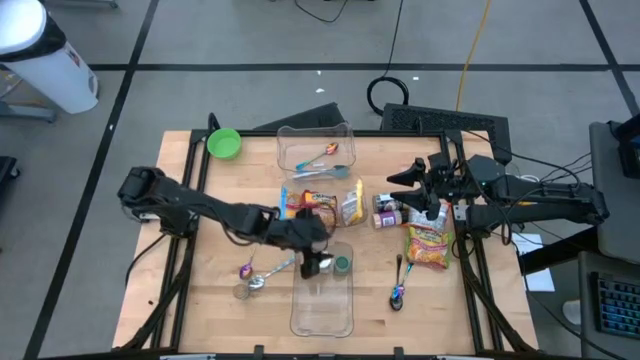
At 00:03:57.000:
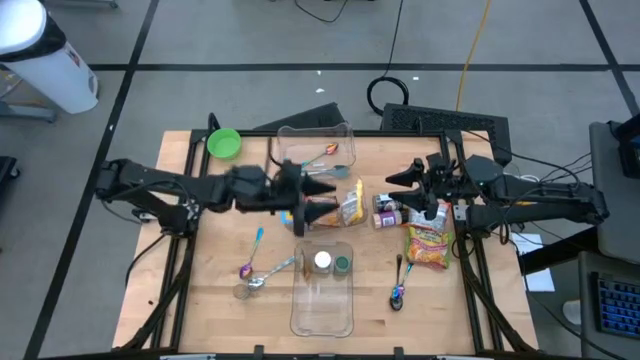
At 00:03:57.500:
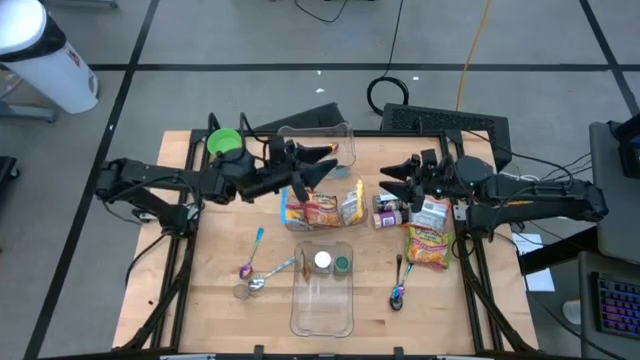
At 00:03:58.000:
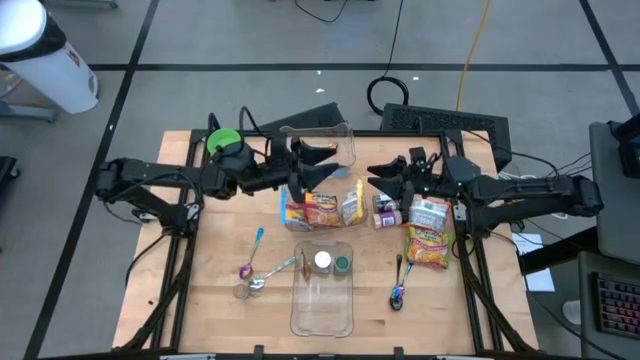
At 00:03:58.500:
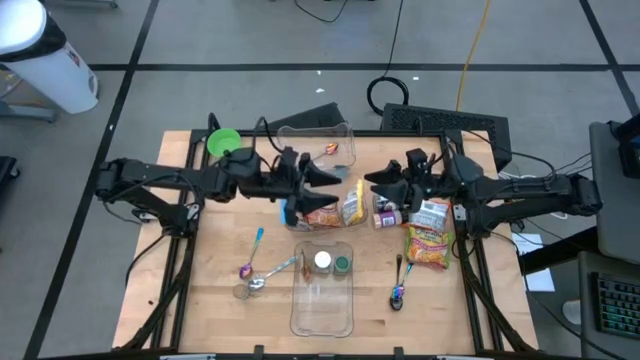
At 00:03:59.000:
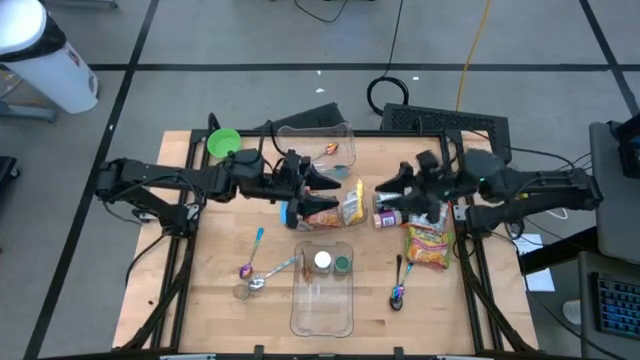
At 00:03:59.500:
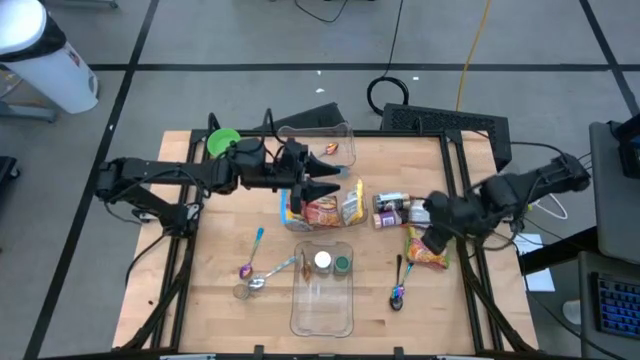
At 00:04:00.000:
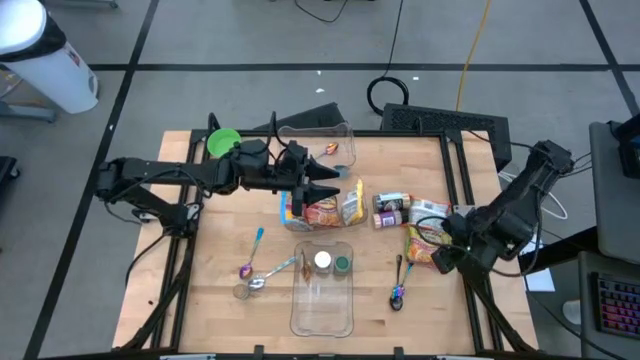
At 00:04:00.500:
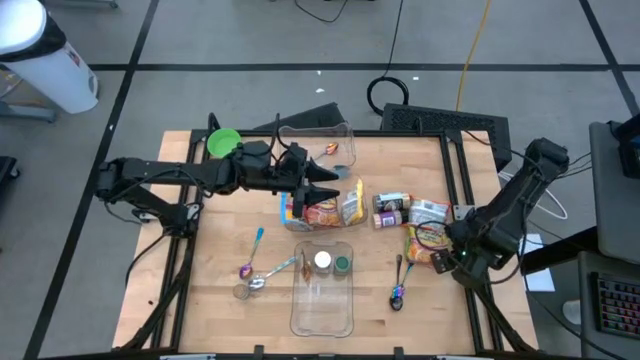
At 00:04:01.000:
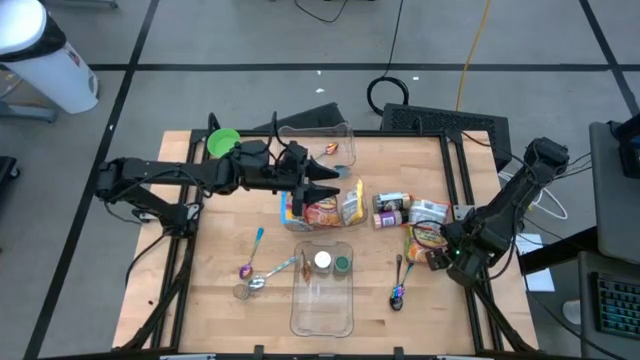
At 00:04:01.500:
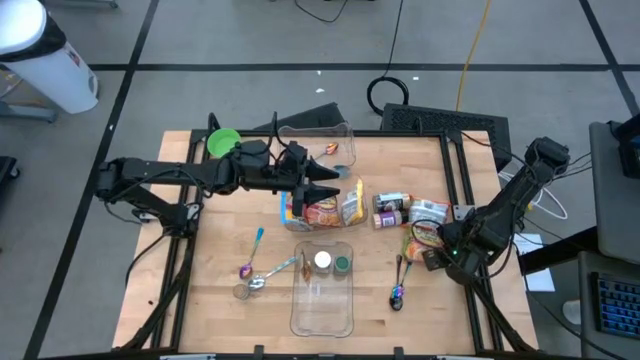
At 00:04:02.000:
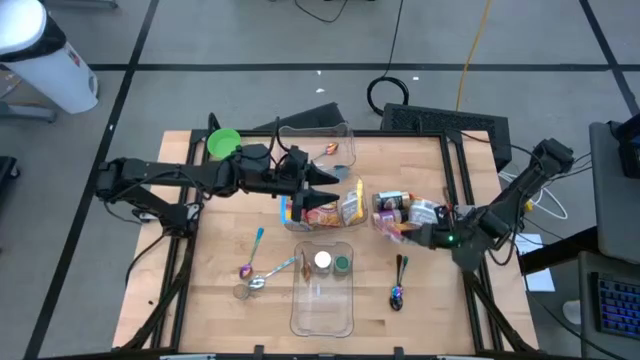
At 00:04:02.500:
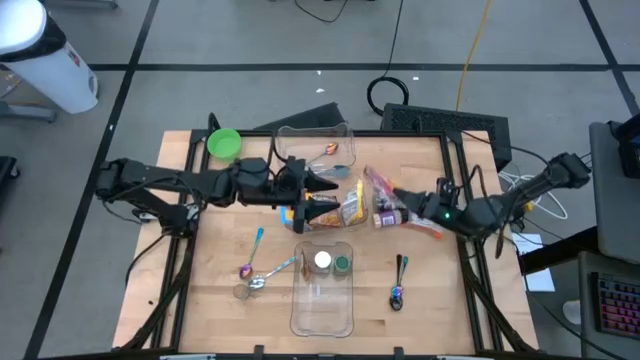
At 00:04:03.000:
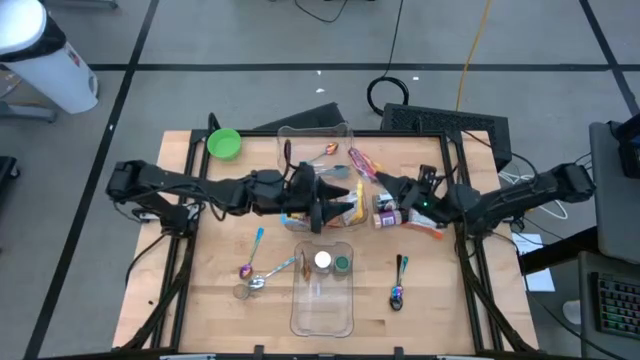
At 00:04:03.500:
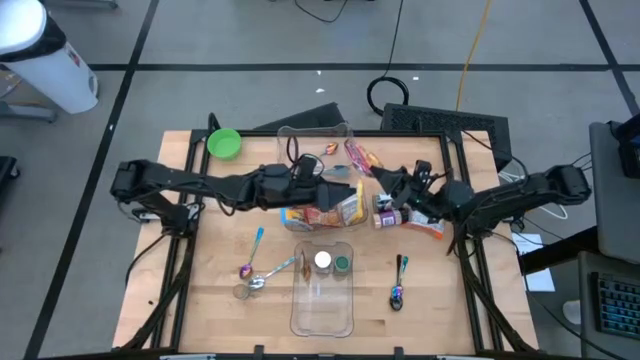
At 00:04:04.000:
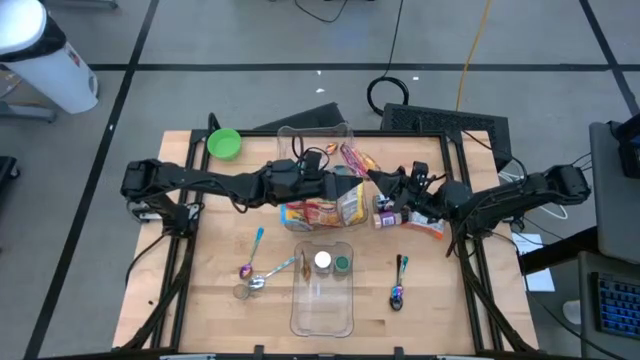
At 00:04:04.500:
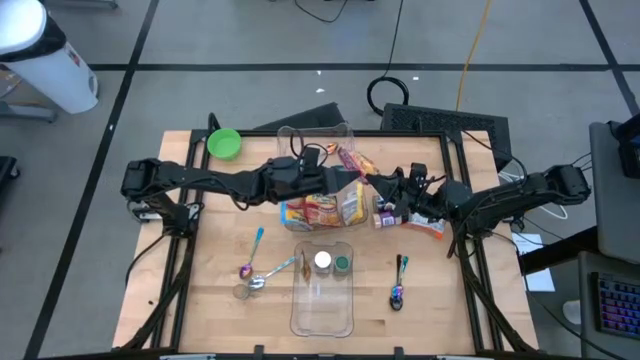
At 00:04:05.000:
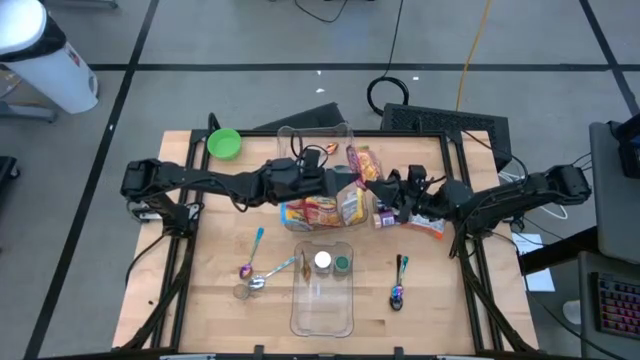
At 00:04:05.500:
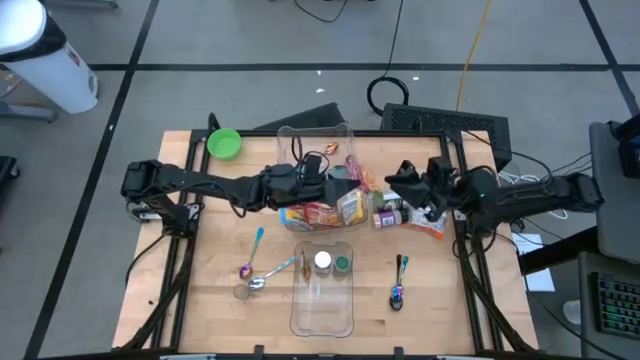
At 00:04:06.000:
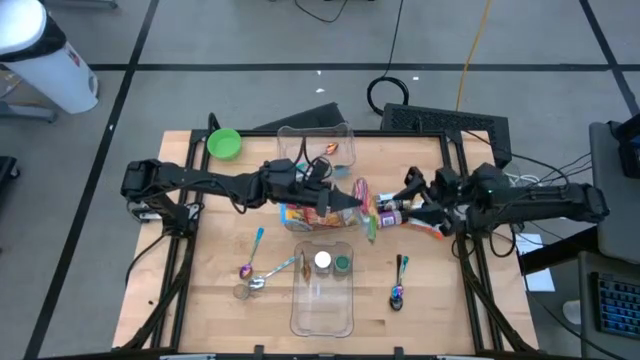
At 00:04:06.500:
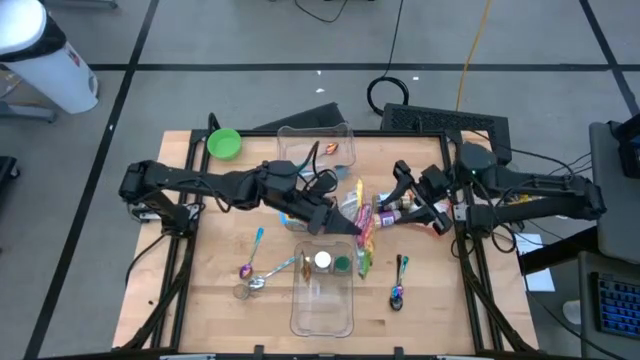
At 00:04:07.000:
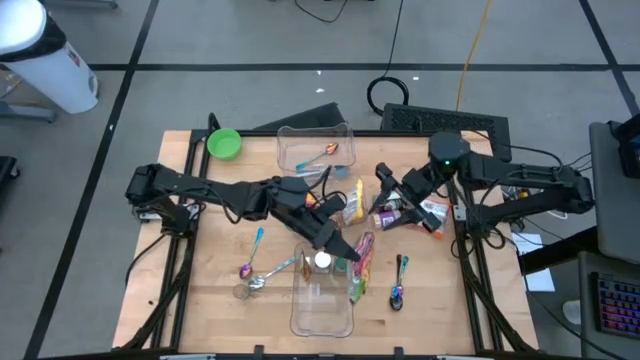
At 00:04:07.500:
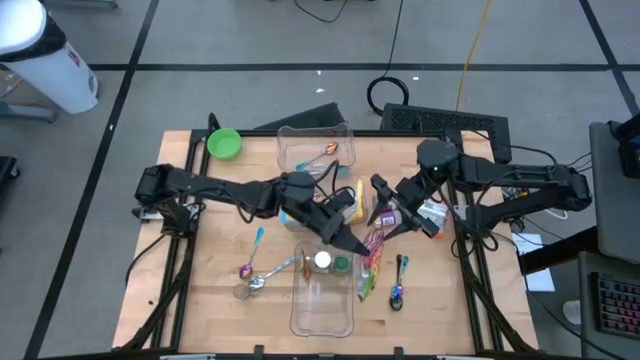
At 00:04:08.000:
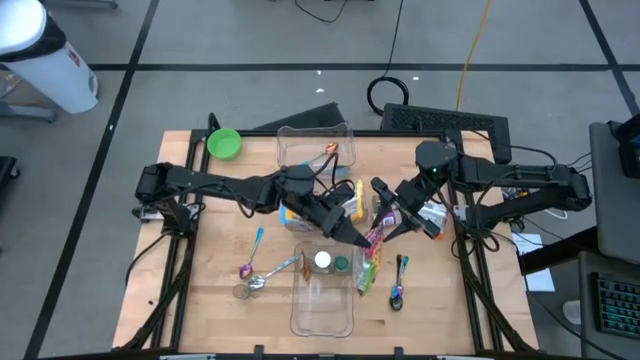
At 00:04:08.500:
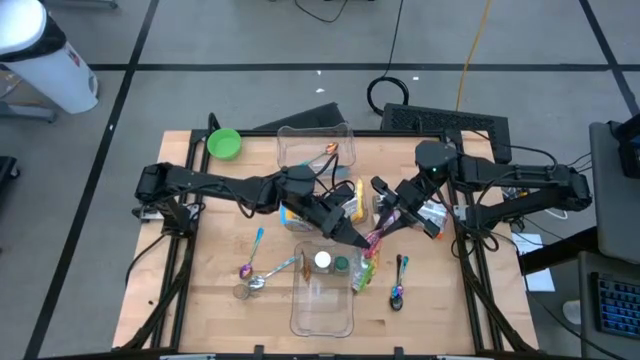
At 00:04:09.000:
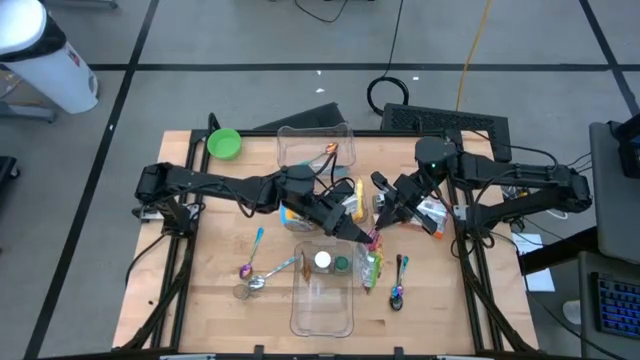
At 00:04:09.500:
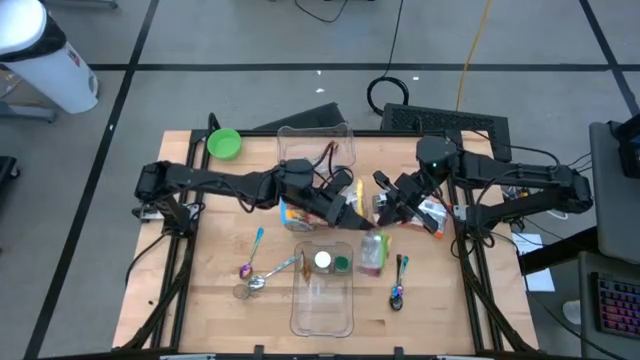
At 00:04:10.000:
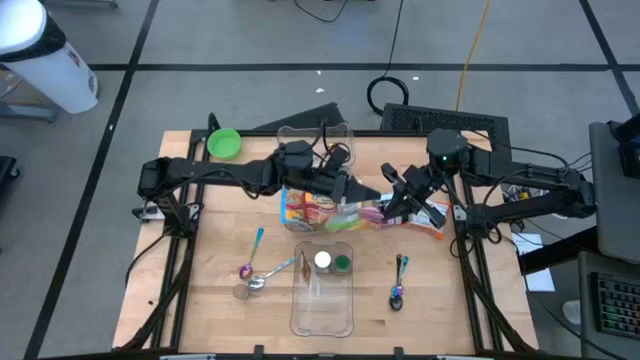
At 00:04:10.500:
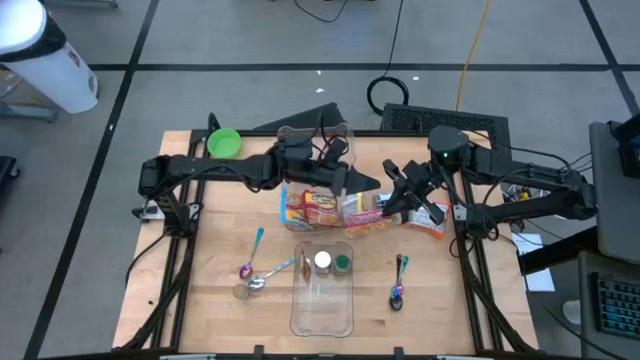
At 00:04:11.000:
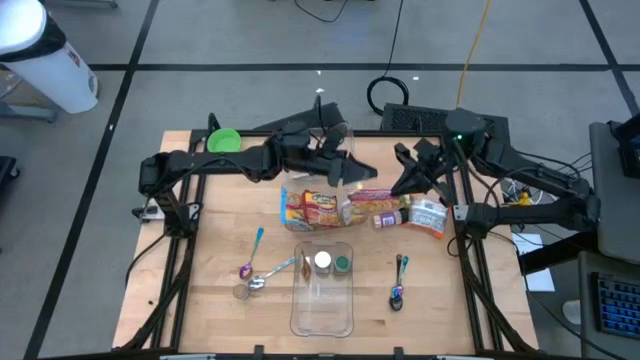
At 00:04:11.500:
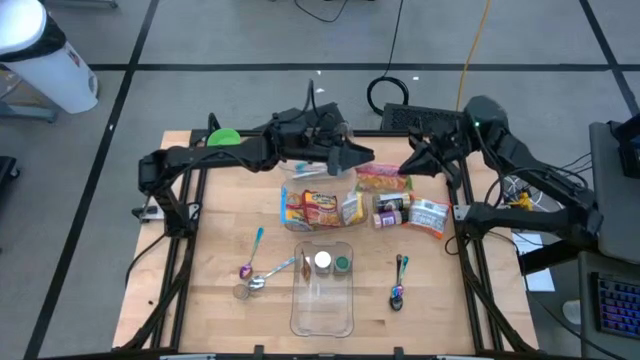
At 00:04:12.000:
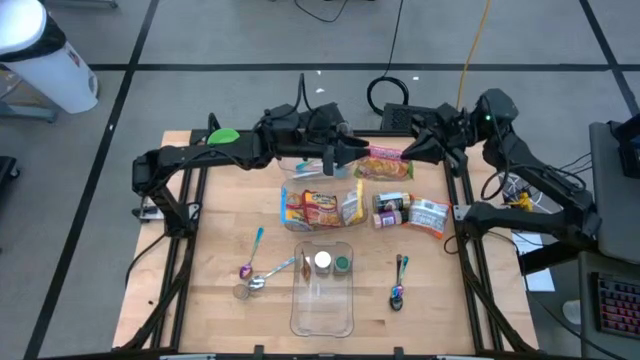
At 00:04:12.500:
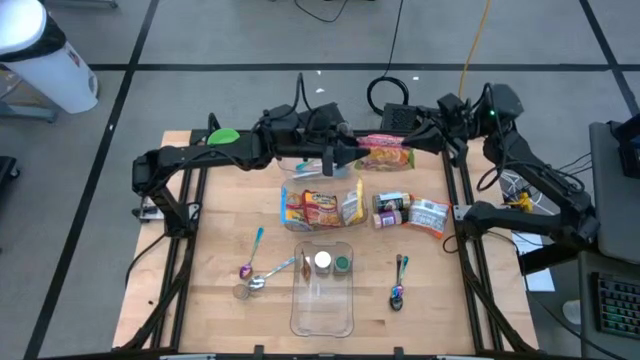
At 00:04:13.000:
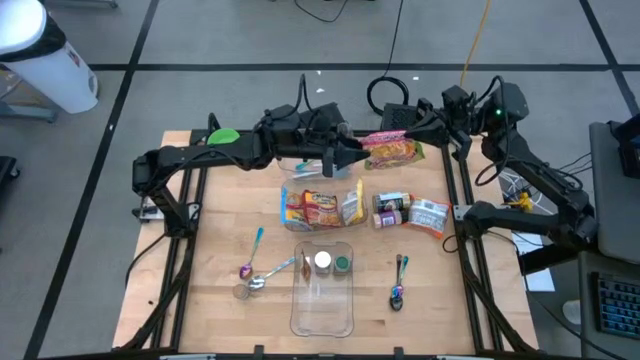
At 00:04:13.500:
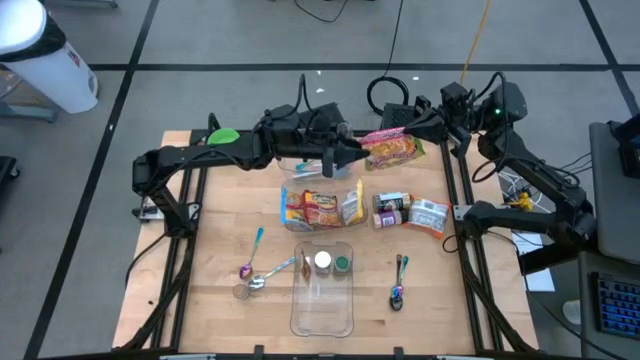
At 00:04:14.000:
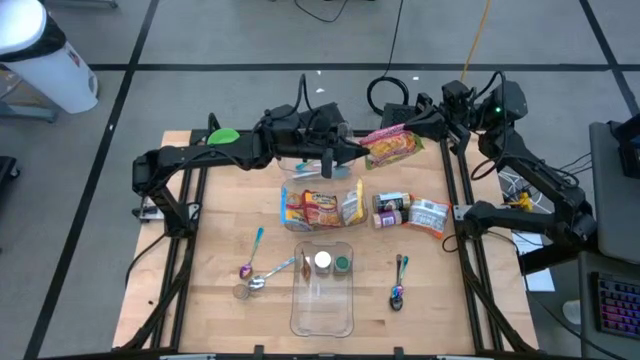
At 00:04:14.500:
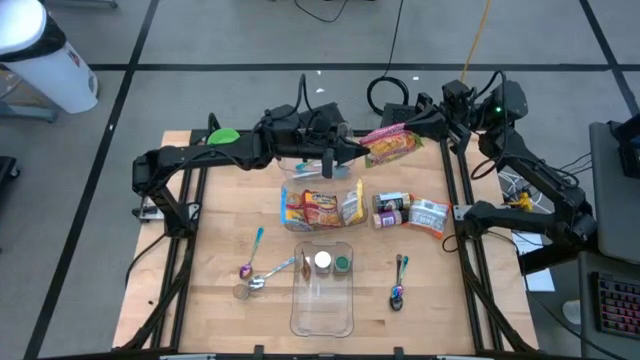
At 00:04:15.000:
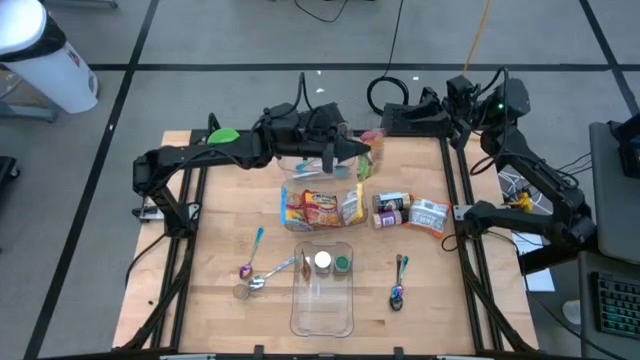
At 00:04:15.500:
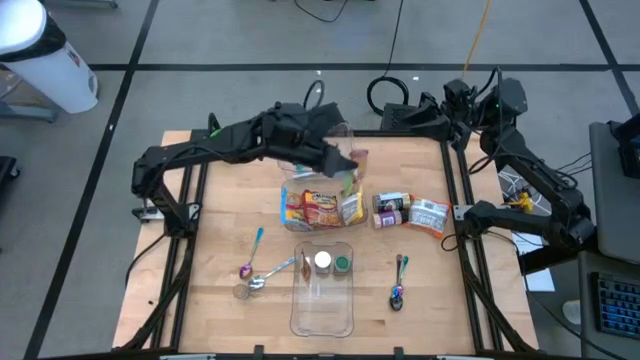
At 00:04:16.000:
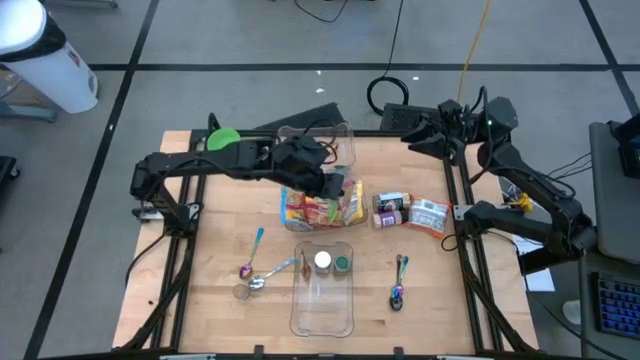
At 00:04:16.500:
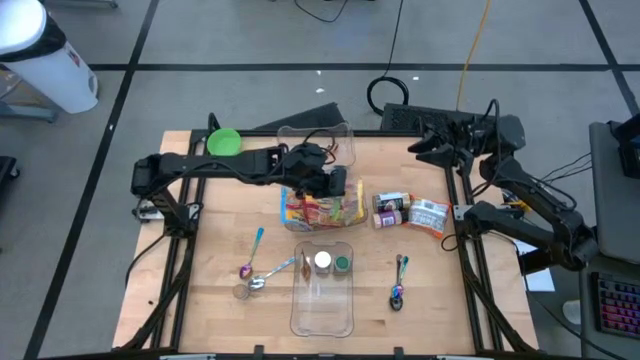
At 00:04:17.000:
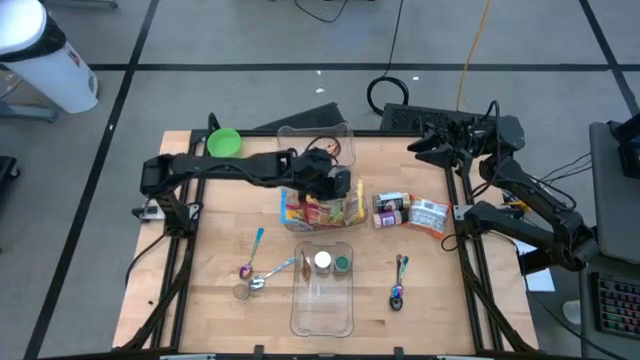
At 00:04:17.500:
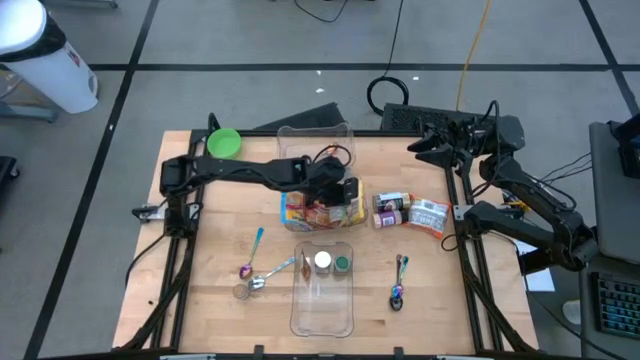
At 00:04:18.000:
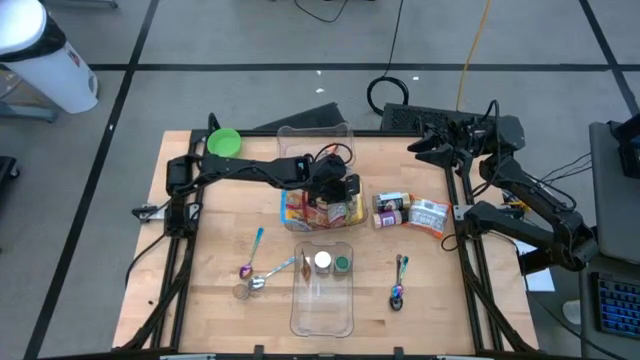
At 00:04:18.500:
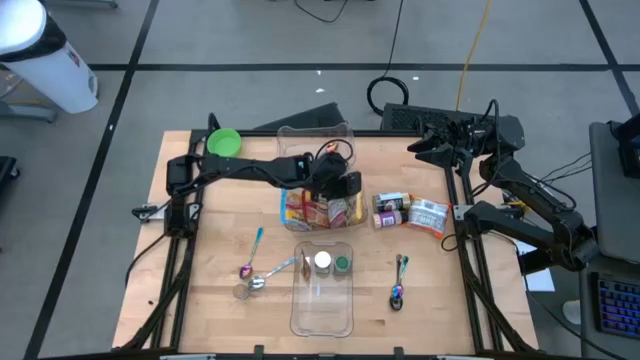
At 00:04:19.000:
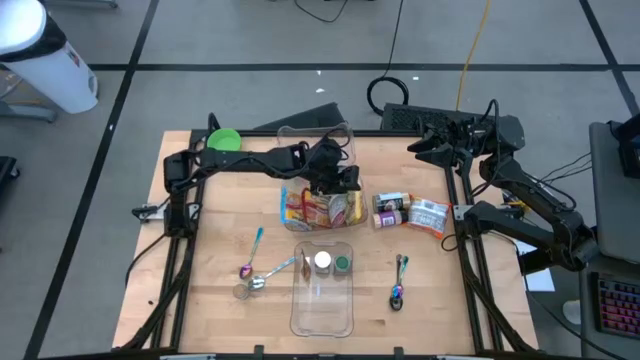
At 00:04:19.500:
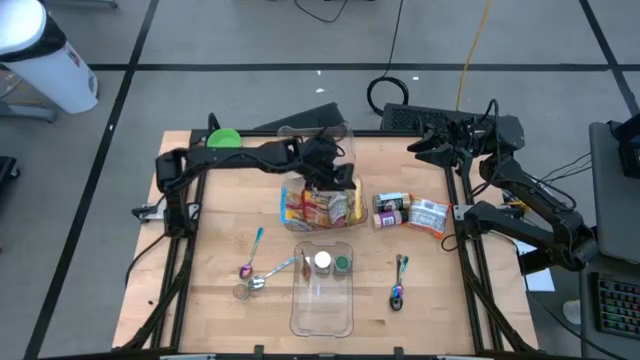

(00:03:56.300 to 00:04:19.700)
Task: Pick & Place Food Item
Put the green noodle pack into the middle transparent bin
